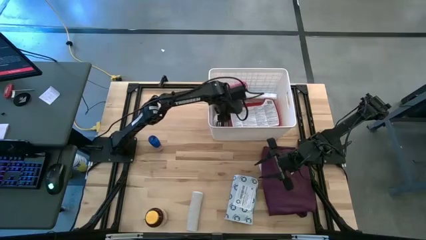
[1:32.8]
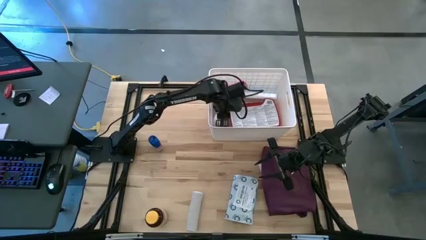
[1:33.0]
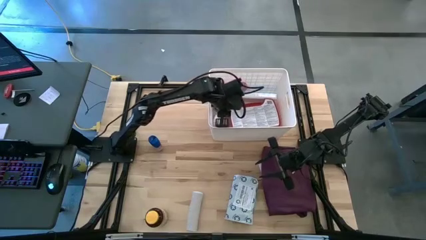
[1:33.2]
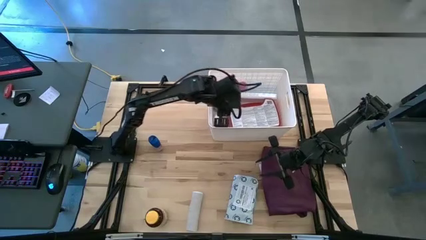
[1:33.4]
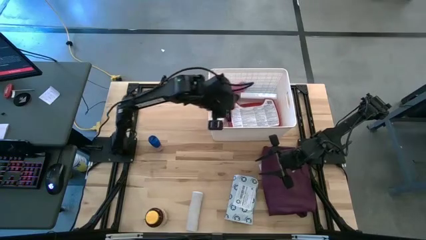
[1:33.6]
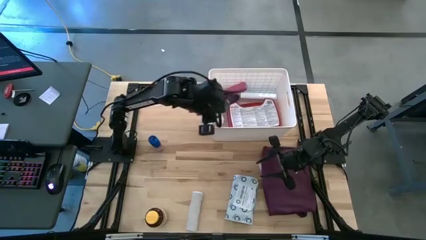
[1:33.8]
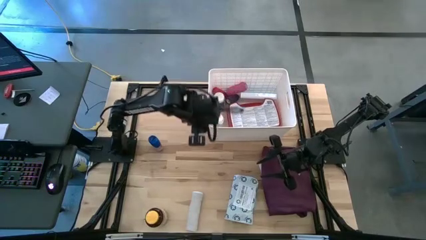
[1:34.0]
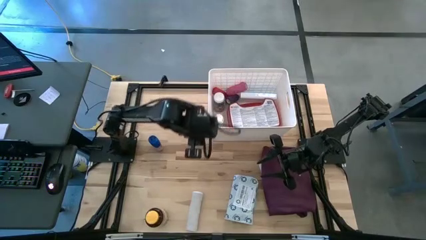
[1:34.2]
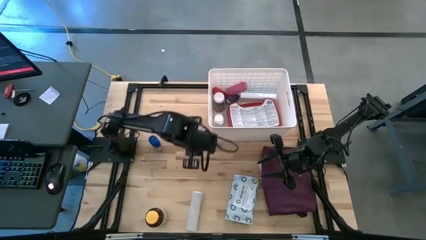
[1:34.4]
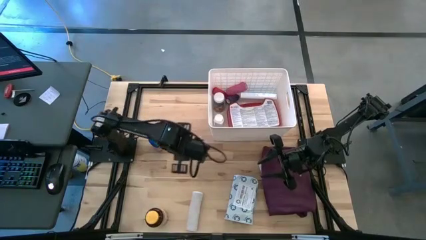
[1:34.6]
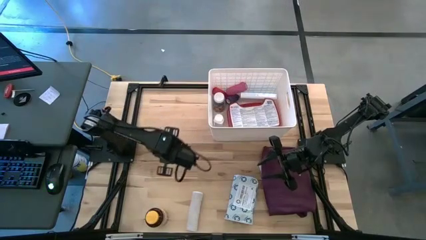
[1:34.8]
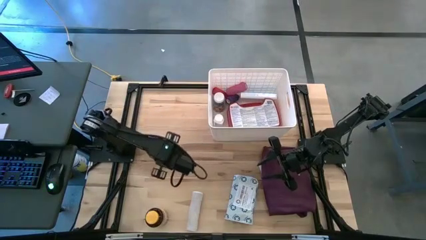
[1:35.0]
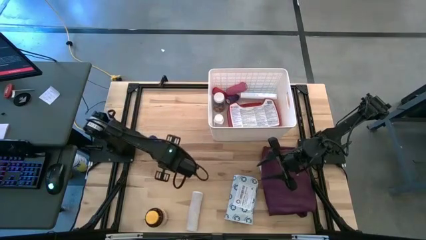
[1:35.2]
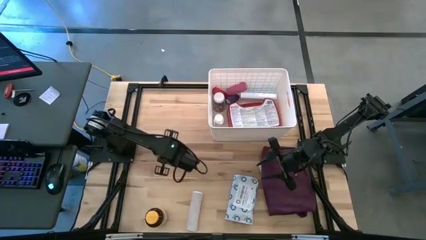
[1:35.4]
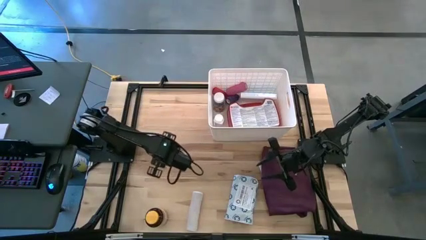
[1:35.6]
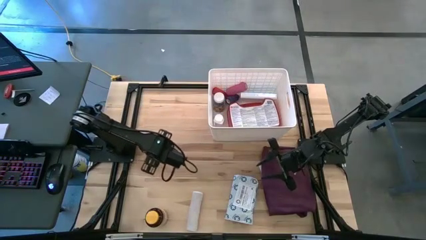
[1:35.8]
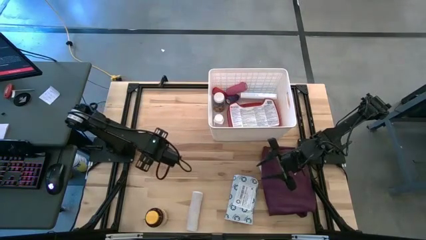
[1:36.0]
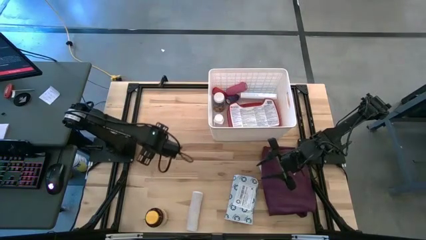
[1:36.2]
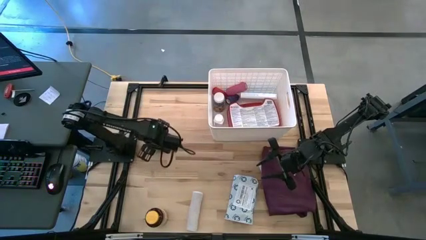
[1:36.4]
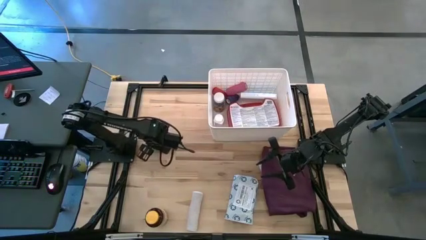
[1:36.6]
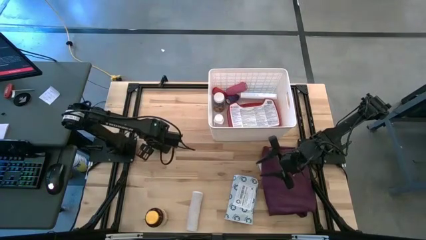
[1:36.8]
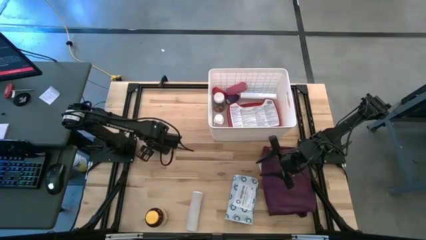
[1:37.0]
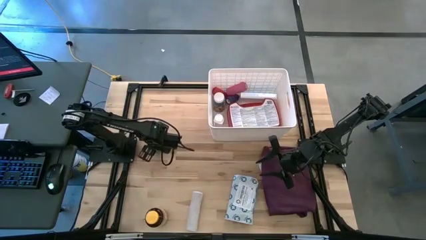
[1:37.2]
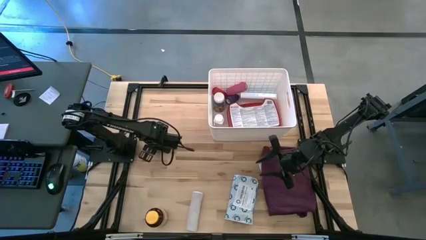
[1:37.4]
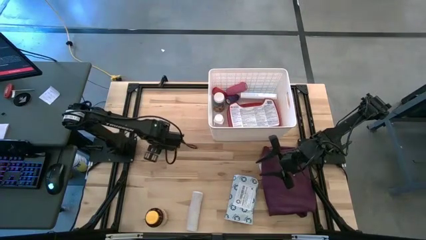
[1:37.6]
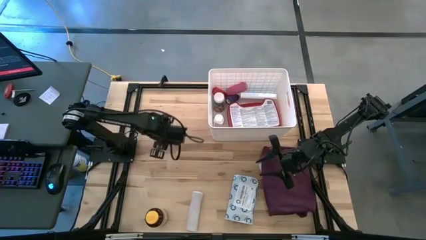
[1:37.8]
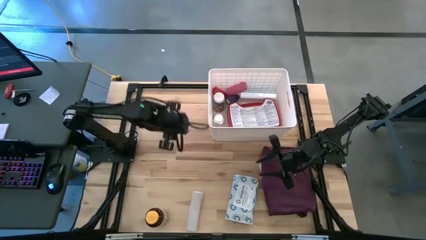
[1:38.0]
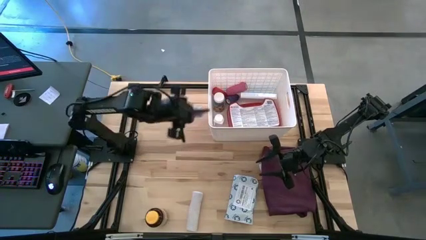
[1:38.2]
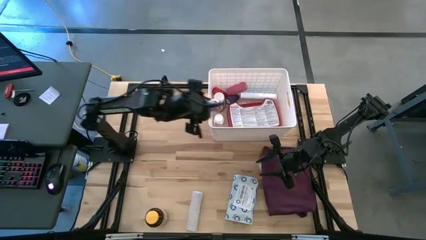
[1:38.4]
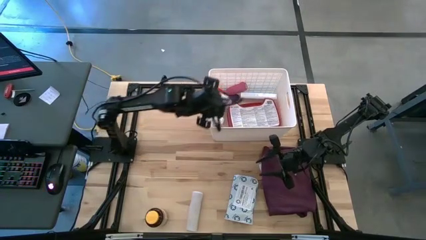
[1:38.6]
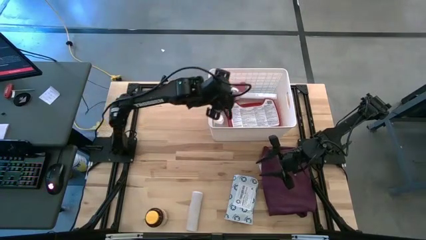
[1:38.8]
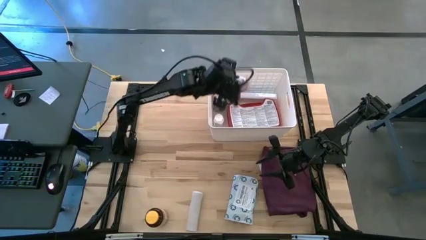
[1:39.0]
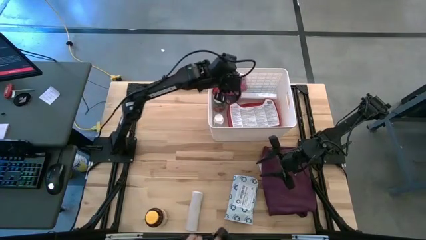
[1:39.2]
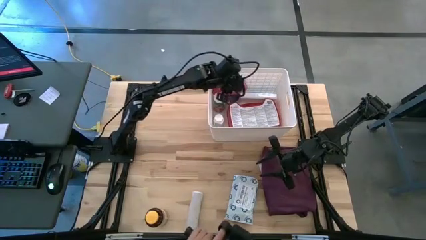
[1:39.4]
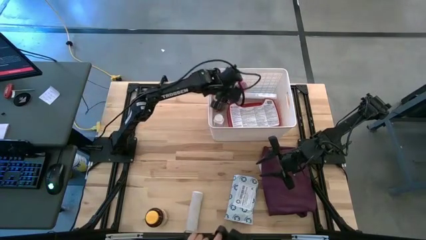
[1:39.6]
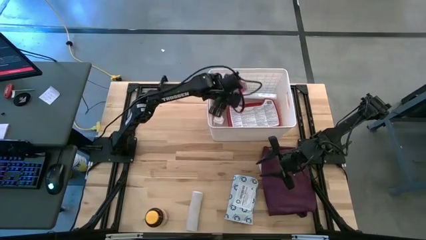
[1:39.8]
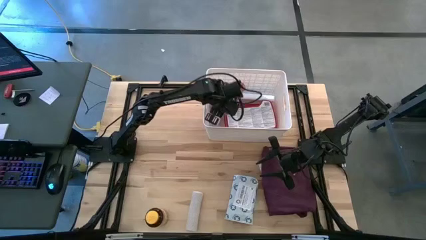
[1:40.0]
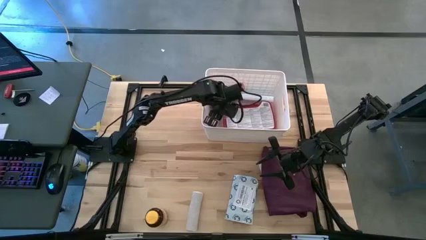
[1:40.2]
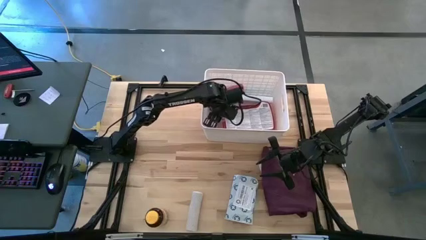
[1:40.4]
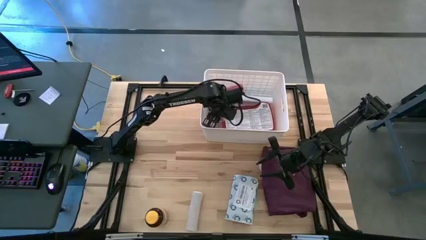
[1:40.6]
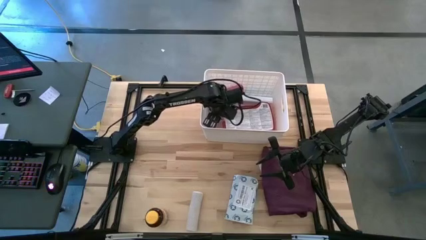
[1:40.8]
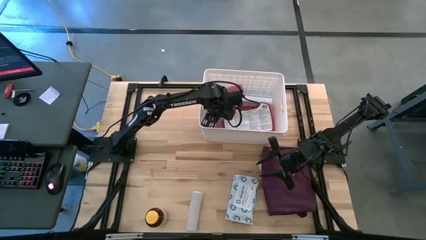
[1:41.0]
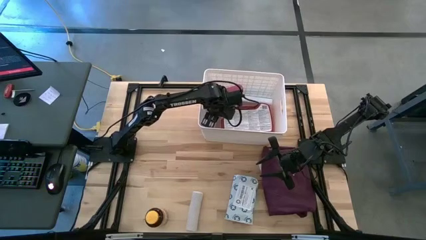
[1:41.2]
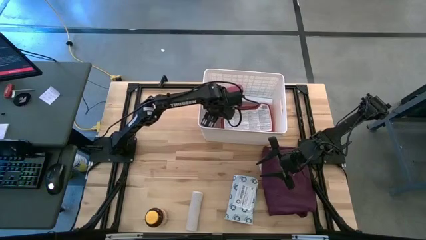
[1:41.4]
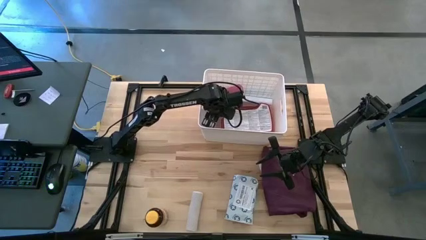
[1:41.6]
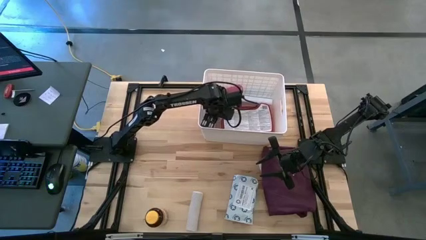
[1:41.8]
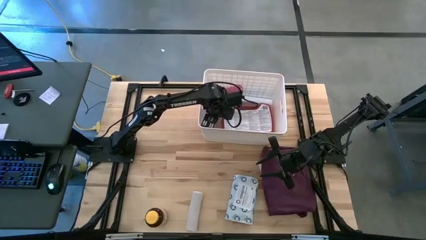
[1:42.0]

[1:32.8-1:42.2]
Task: Pick & place medical supplies in basket/bin
Put the blue medicine bottle into the white container

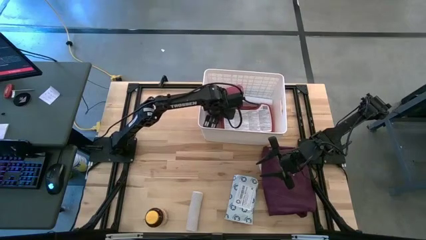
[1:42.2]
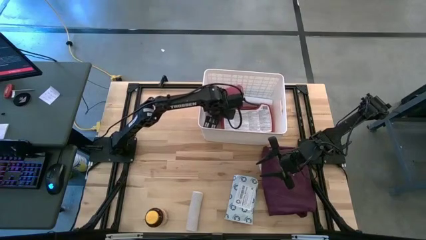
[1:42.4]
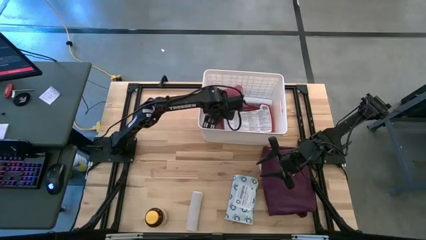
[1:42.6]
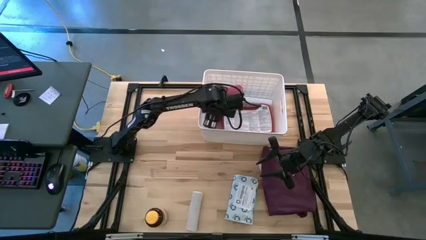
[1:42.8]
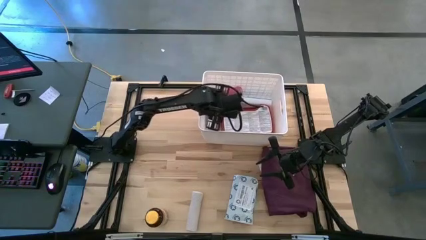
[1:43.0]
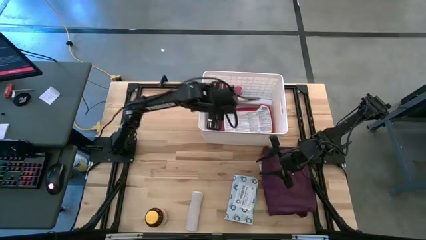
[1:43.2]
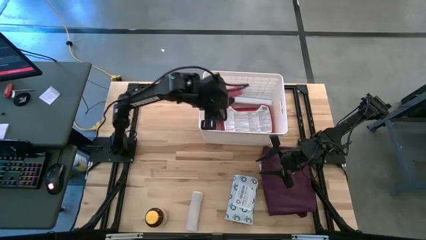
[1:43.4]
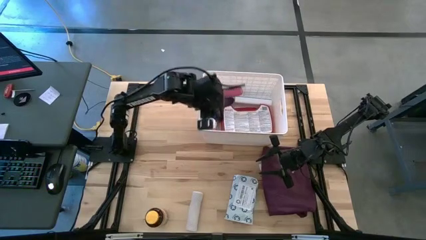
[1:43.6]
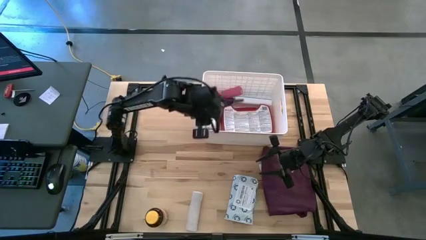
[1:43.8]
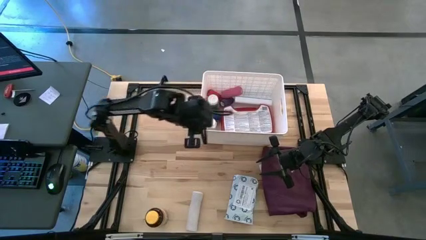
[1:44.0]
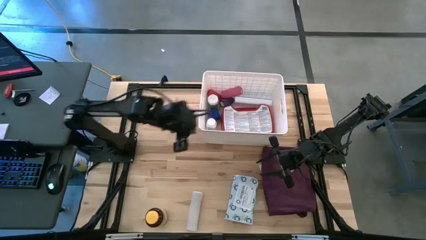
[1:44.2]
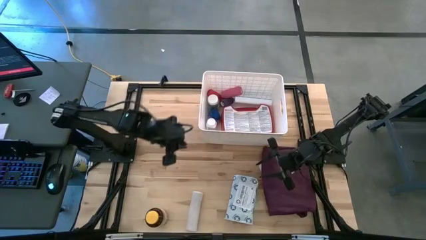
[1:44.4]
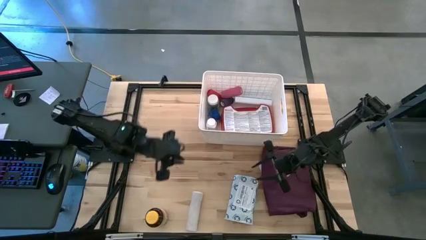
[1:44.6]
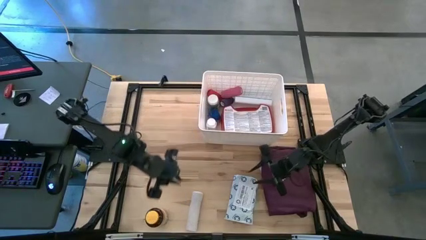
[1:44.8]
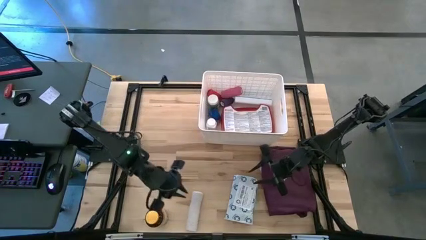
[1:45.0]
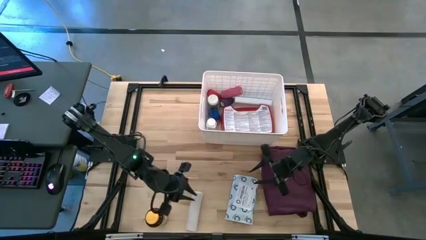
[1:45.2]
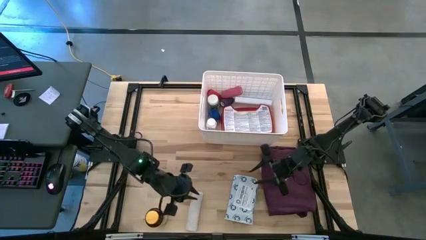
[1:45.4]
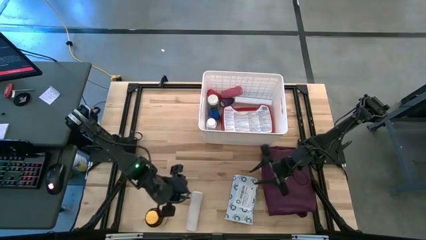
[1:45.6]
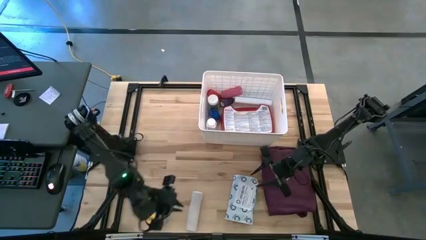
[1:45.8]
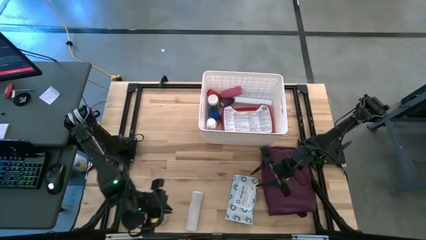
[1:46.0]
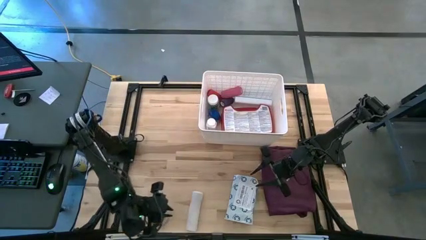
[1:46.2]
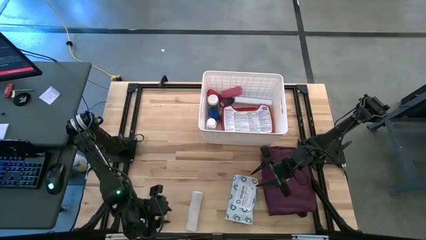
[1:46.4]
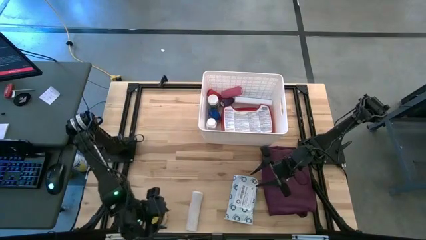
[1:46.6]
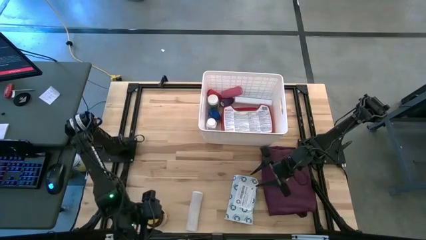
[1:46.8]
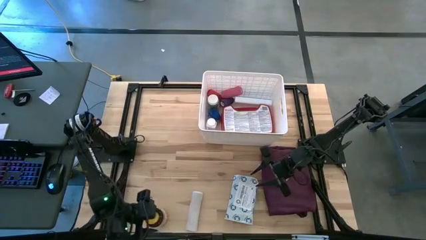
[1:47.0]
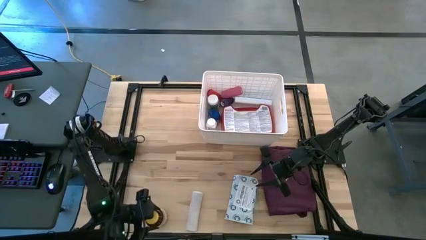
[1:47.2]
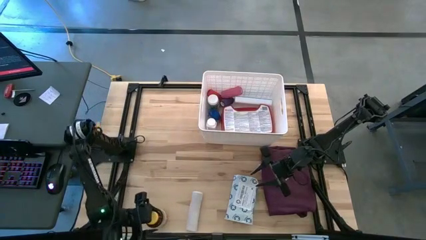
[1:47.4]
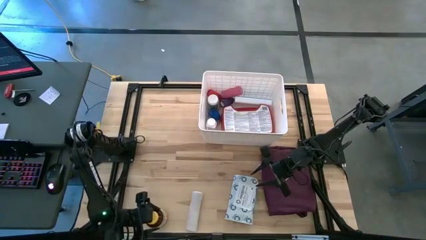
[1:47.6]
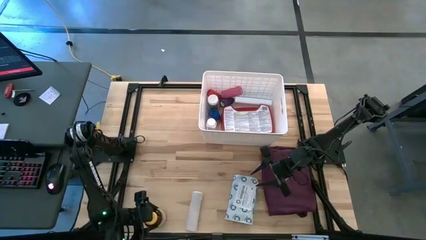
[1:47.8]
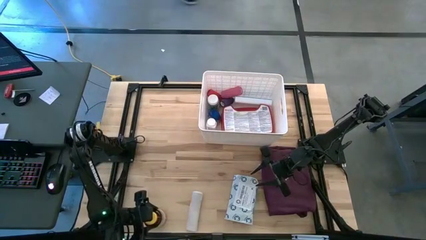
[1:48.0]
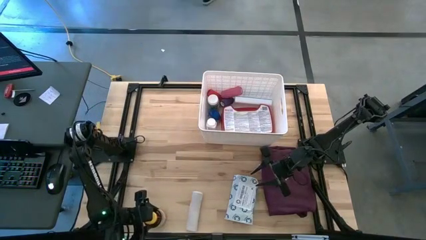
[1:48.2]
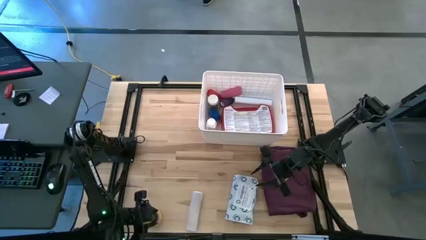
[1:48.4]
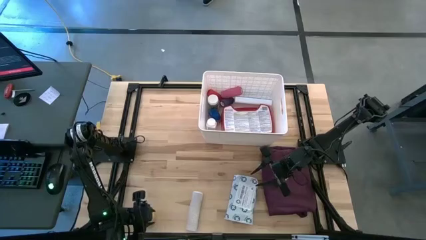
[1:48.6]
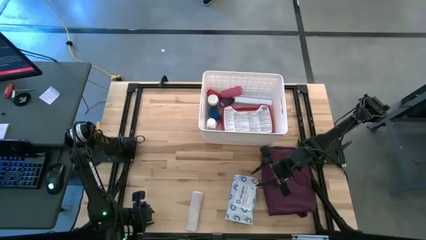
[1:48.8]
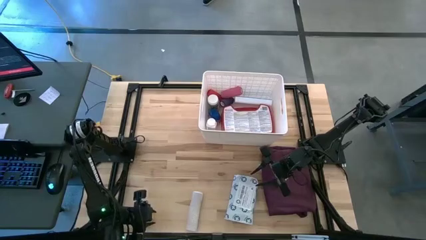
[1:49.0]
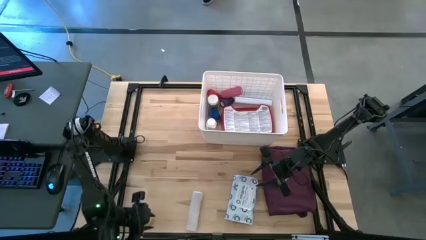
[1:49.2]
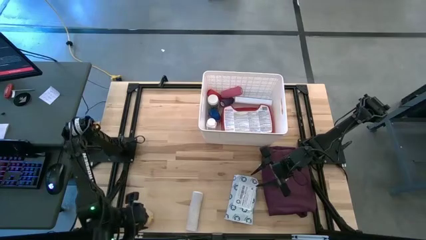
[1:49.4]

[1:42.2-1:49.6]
Put the yellow medicine bottle into the white container
